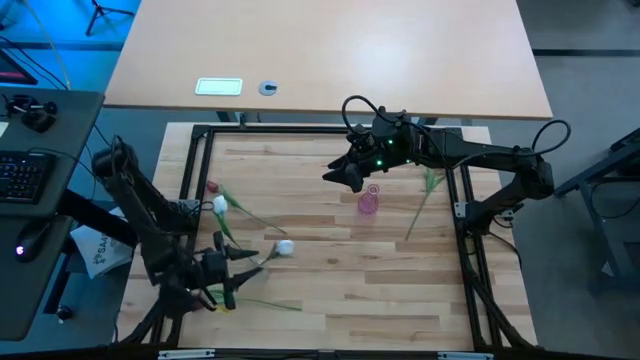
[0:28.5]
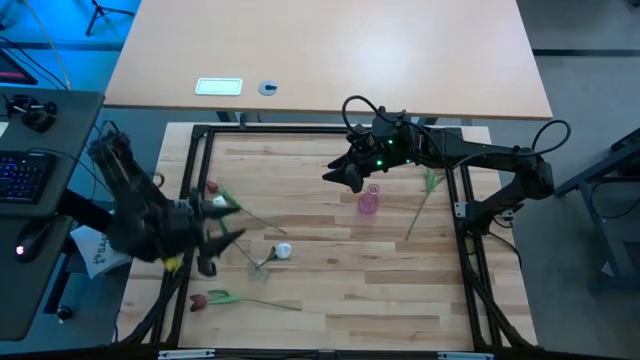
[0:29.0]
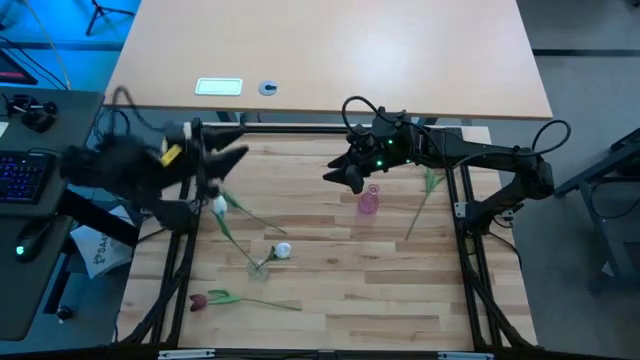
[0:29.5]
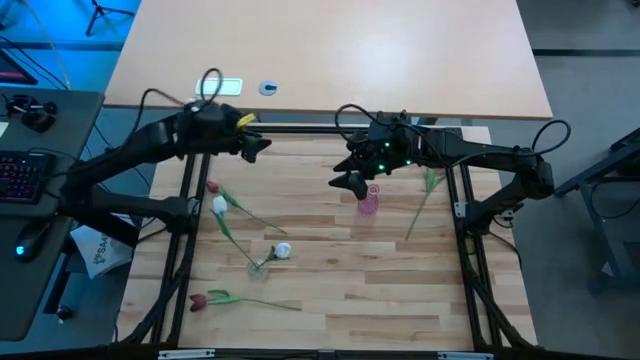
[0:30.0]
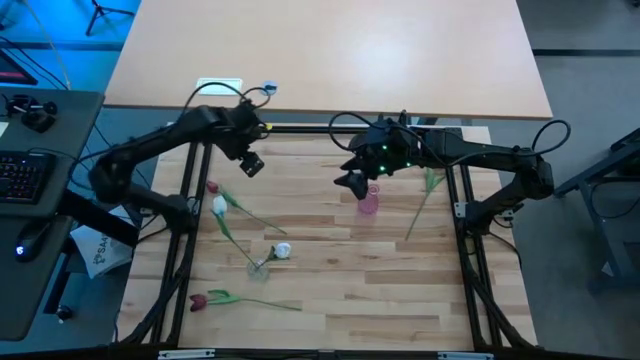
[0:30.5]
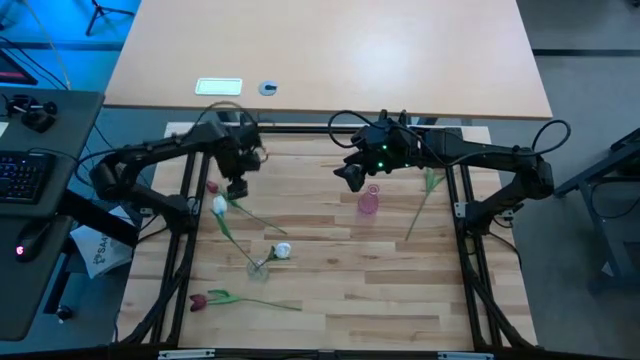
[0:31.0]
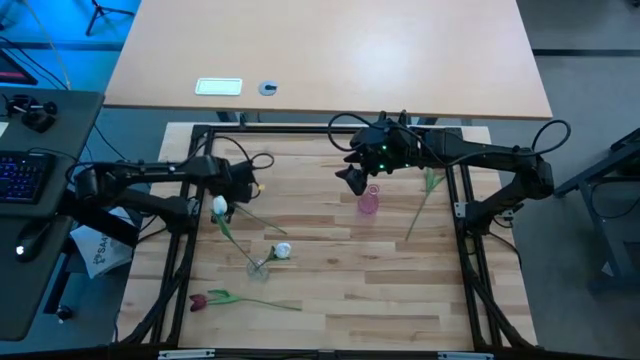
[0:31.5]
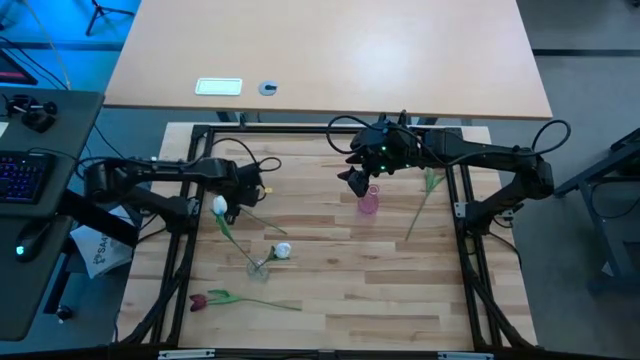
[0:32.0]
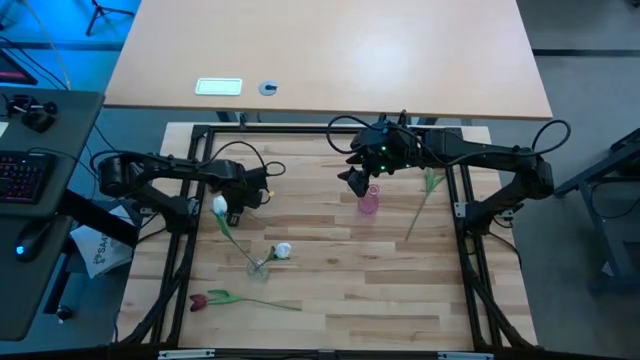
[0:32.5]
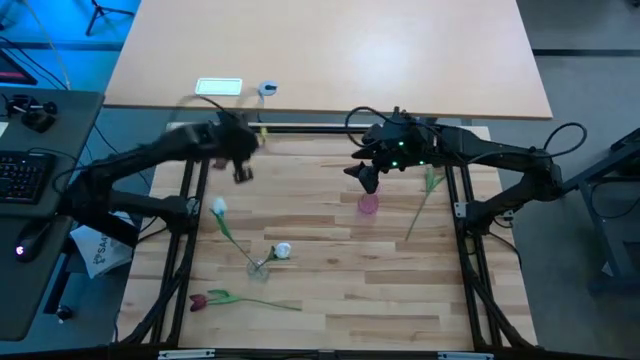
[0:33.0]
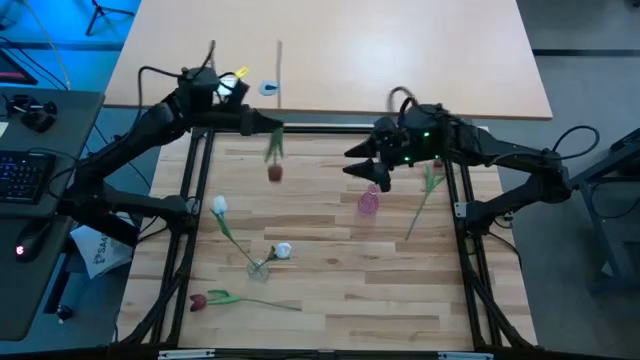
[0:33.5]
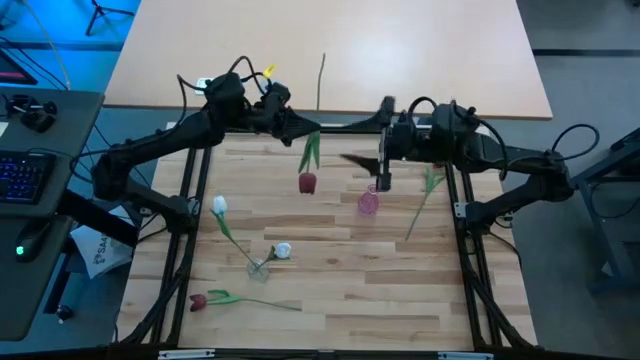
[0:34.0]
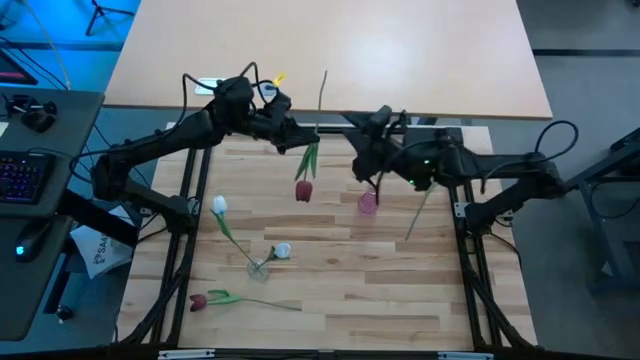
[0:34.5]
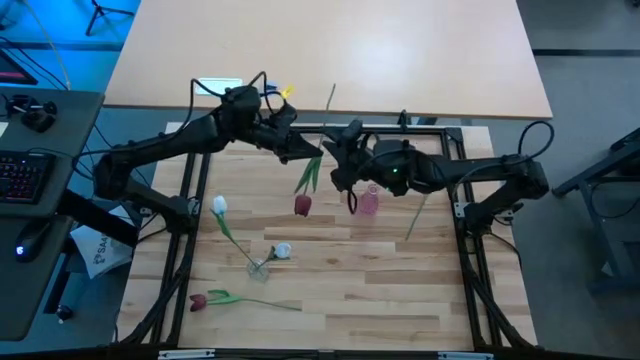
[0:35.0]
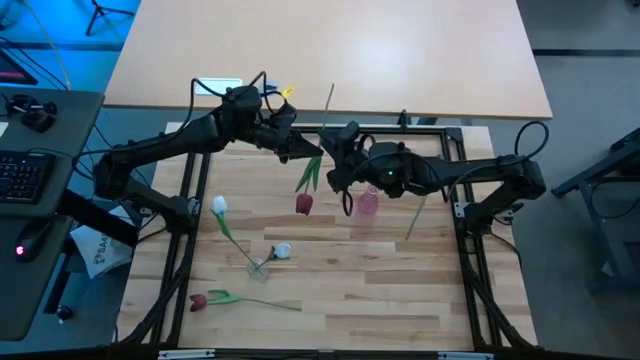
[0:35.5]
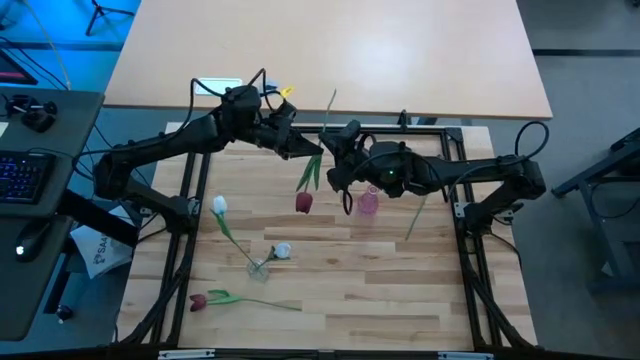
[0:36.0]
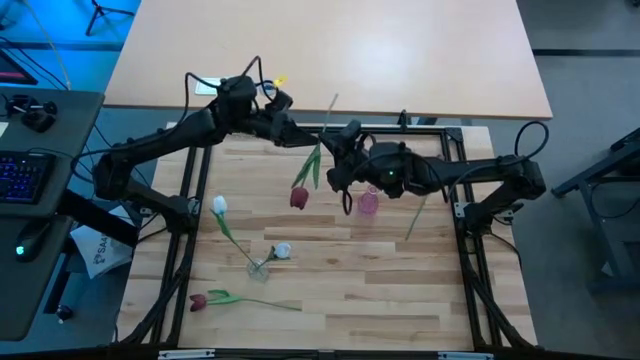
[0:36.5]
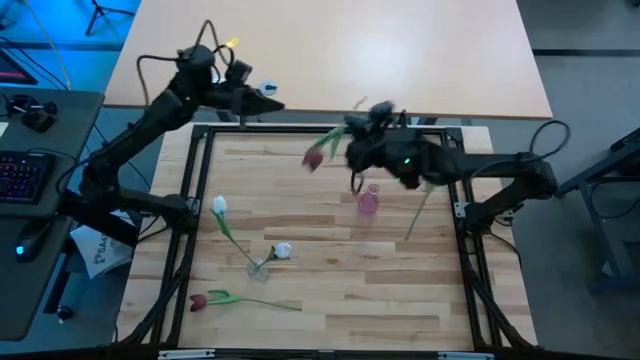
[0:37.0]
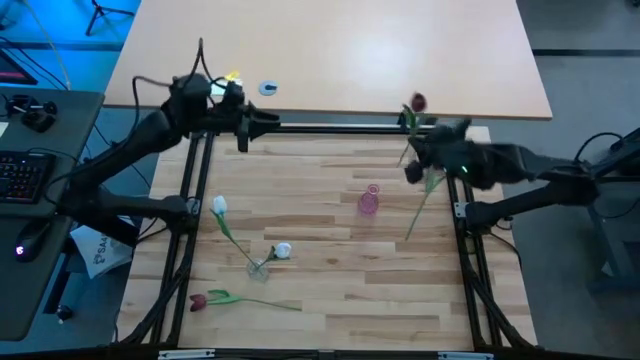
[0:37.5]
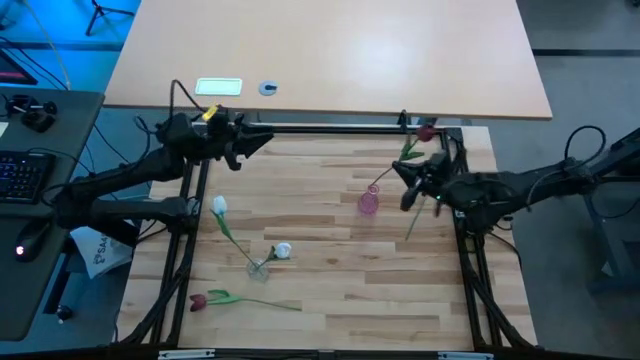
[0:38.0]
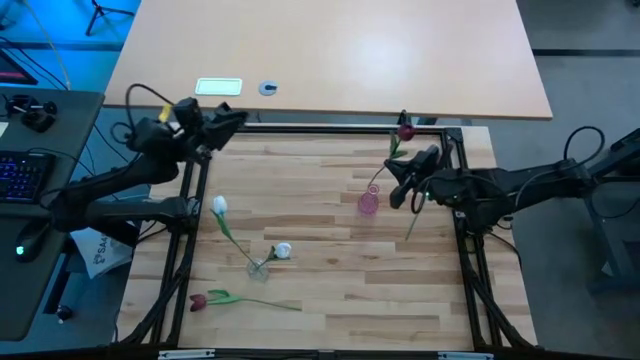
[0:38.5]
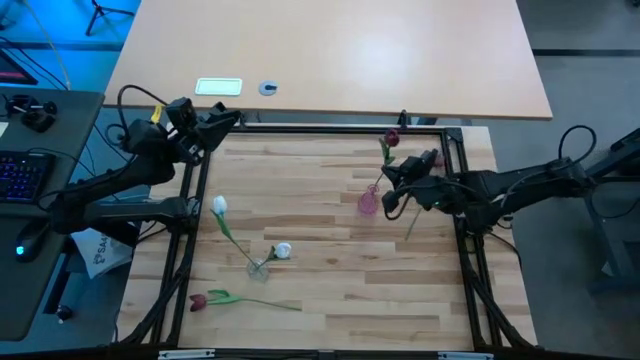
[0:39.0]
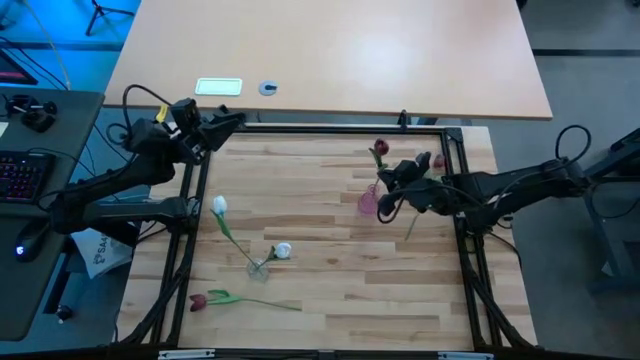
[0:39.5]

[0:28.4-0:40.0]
Task: Sort flowers into vase by color
Put the top left red flower into the purple vase

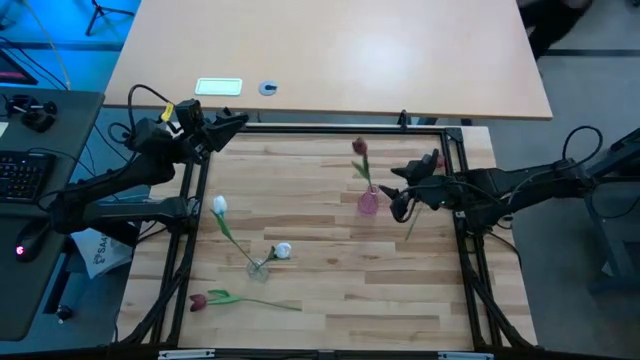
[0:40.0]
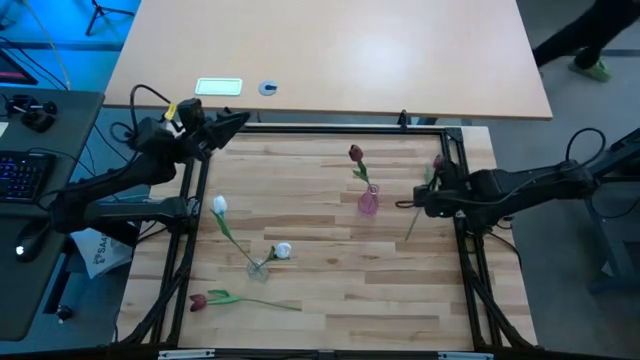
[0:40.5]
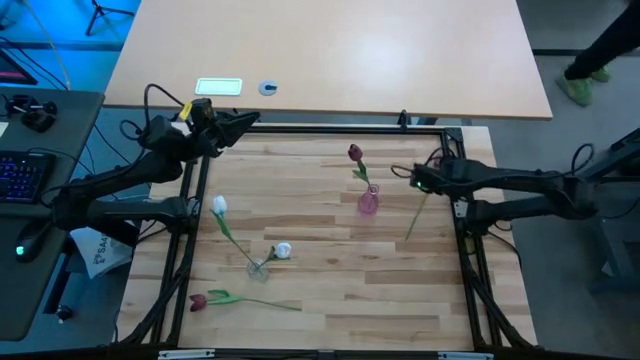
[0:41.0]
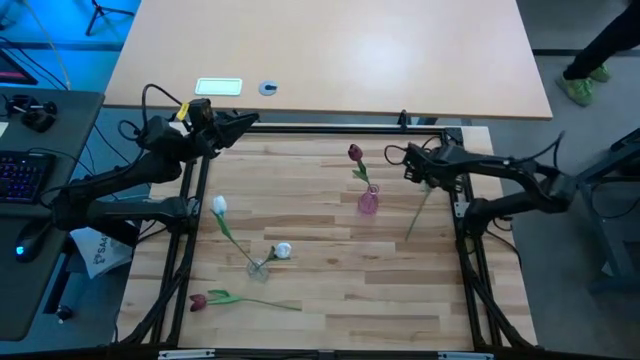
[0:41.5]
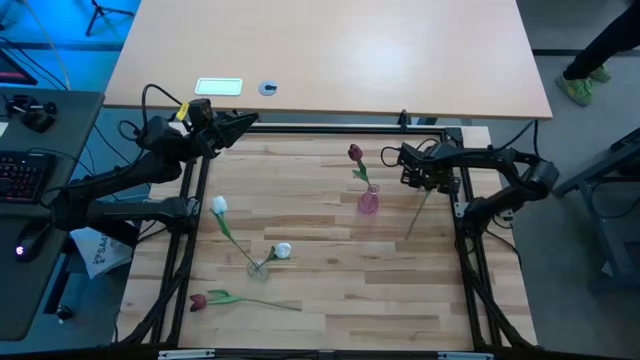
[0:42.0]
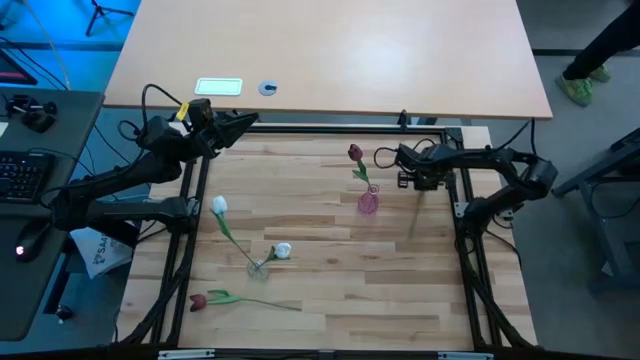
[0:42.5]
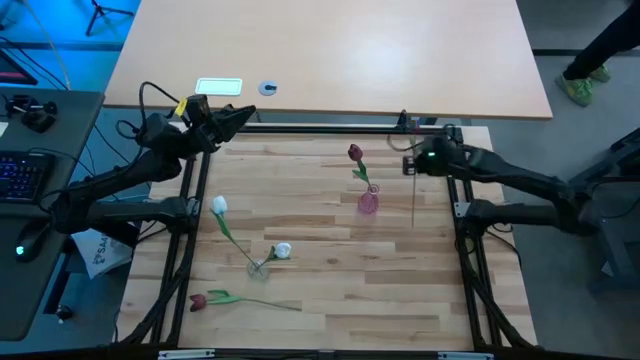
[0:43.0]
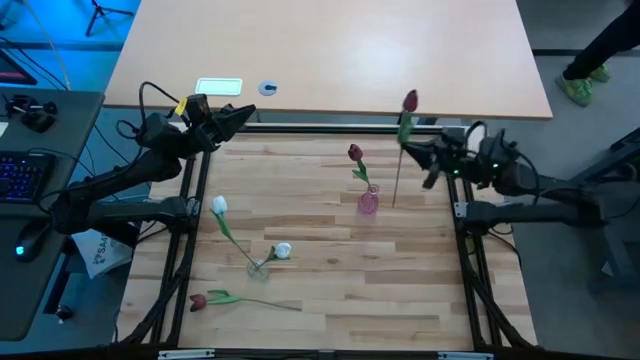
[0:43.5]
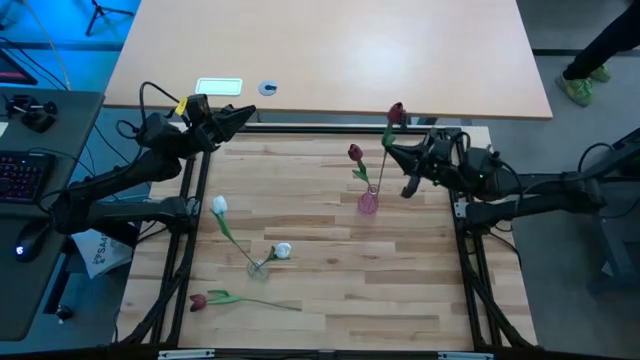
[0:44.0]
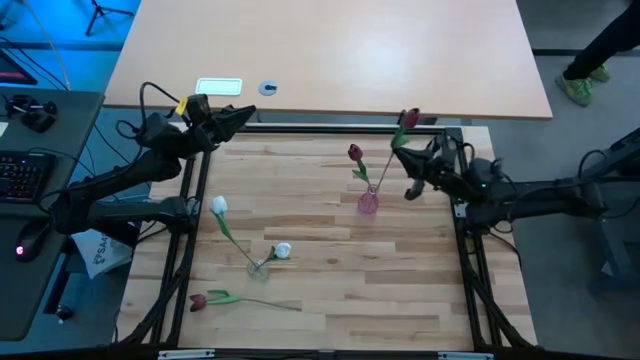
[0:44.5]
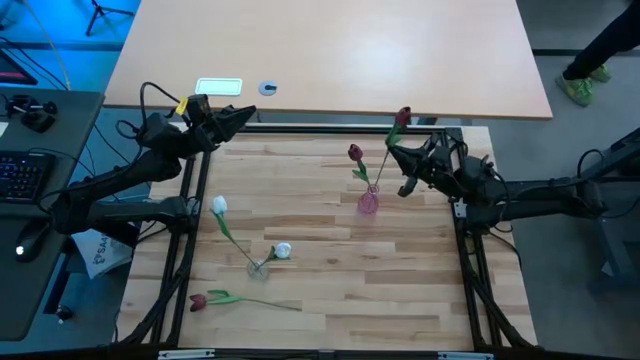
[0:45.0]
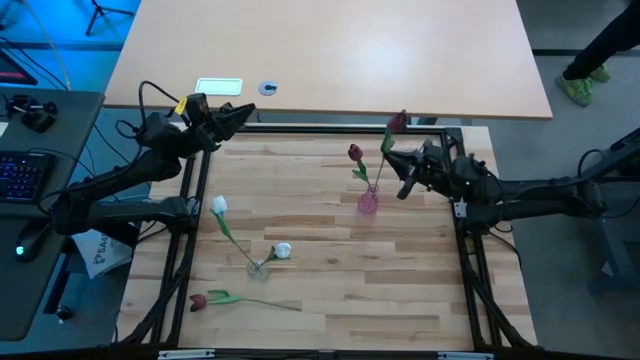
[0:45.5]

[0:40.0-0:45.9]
Put the right red flower into the purple vase

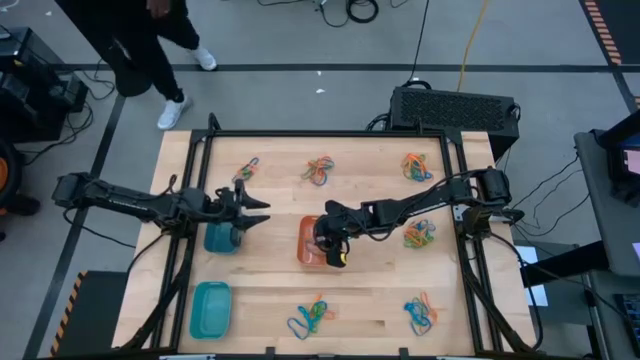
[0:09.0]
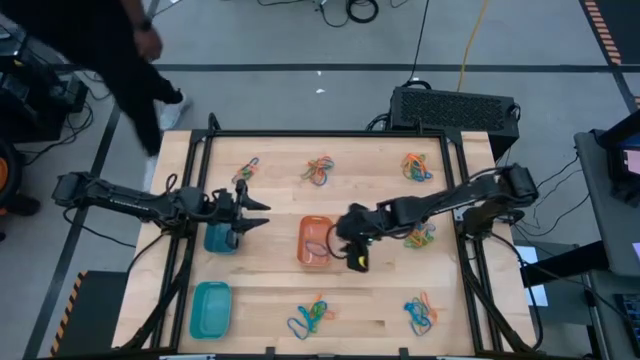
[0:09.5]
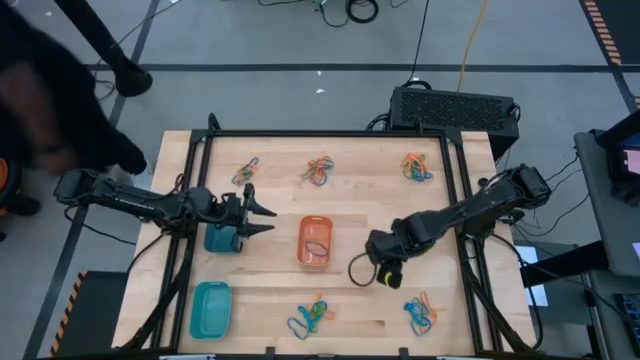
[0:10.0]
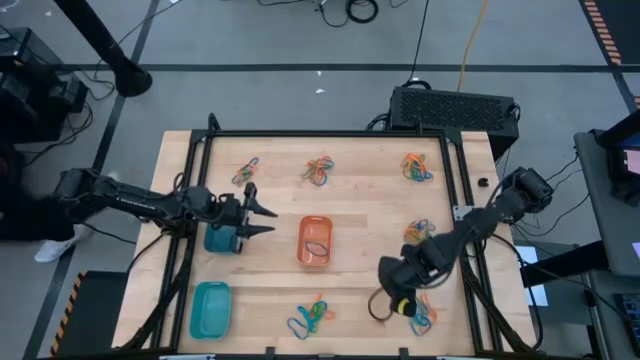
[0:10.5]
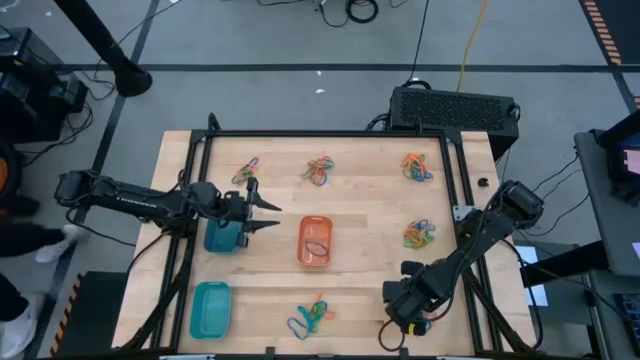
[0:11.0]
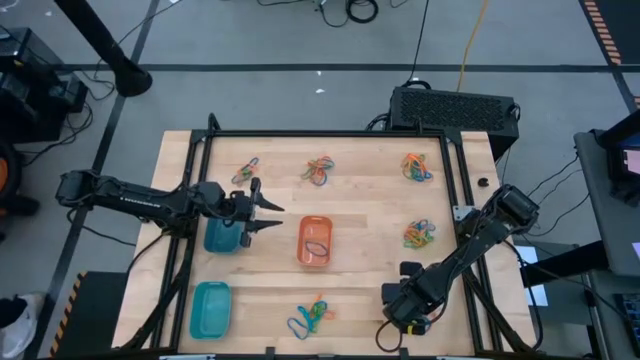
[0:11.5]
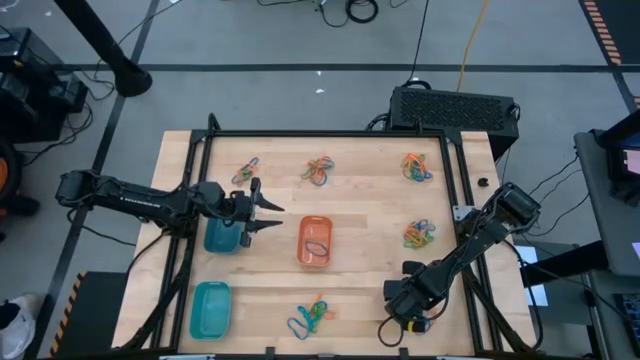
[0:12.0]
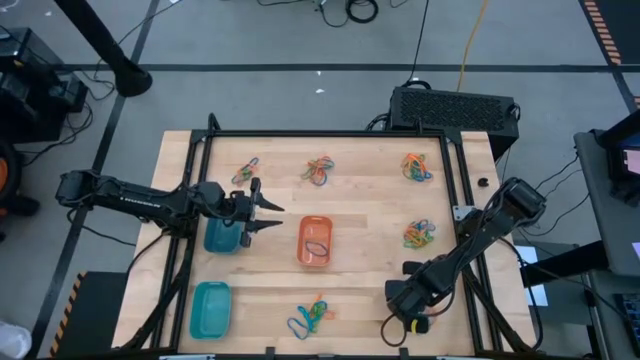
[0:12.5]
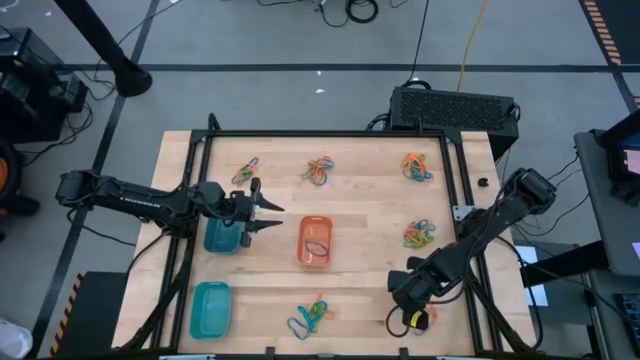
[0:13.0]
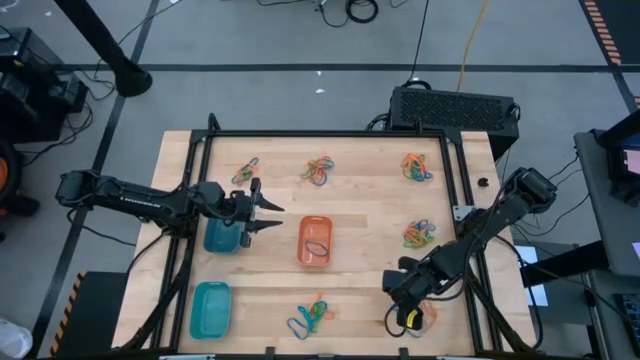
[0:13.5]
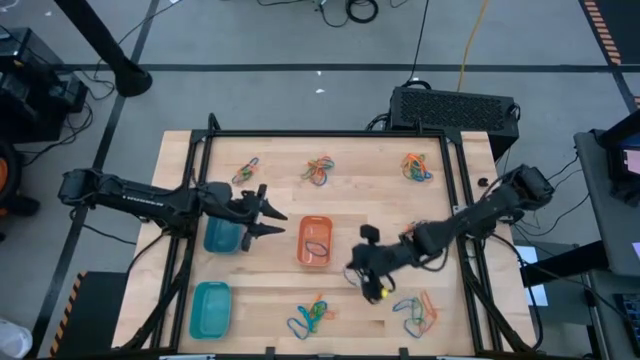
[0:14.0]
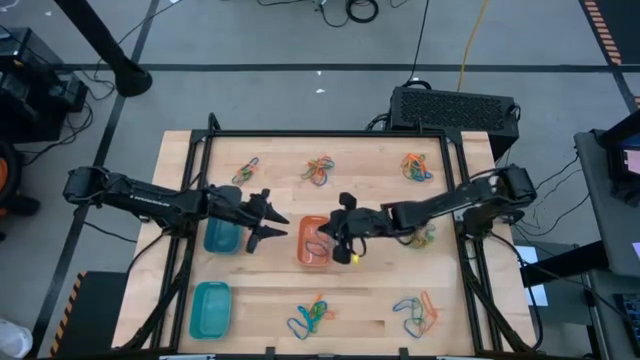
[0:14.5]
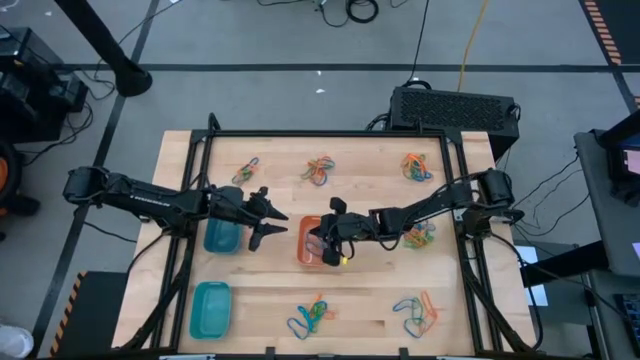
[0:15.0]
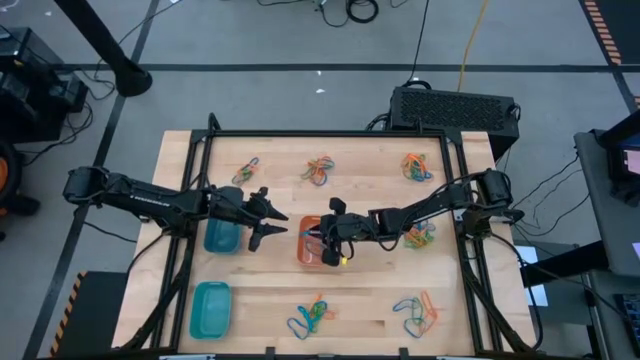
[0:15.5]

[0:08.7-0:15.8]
Task: Sort rubber bands into baskets
Put the blue rubber band into the orange bin
